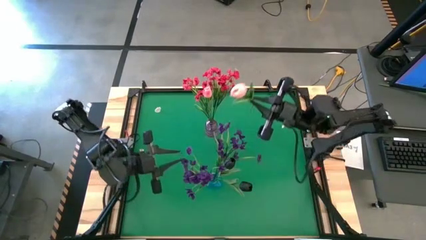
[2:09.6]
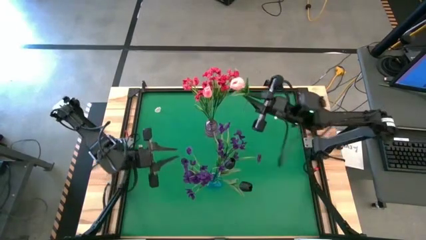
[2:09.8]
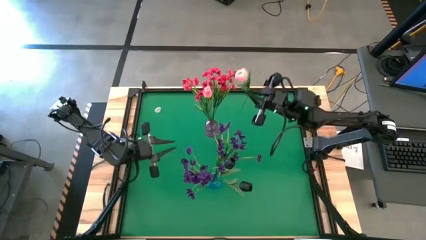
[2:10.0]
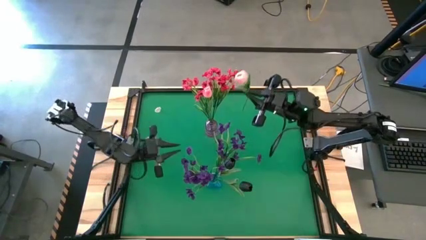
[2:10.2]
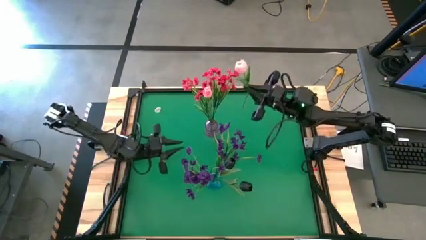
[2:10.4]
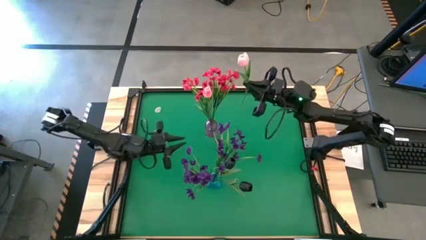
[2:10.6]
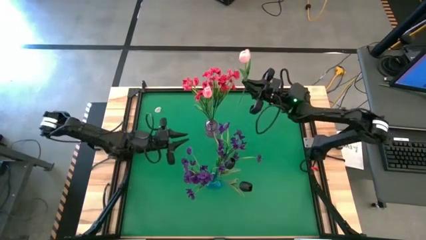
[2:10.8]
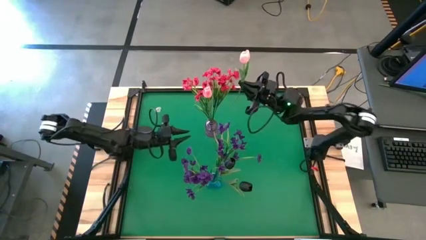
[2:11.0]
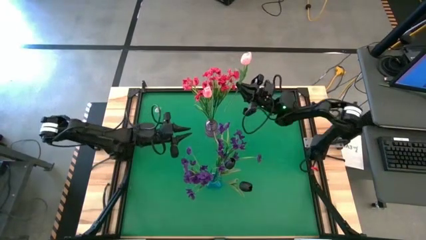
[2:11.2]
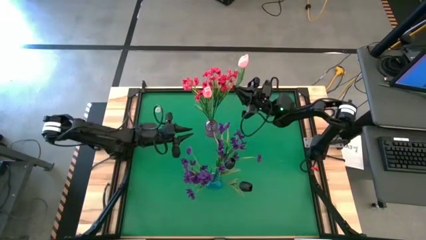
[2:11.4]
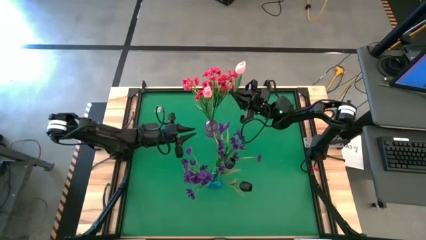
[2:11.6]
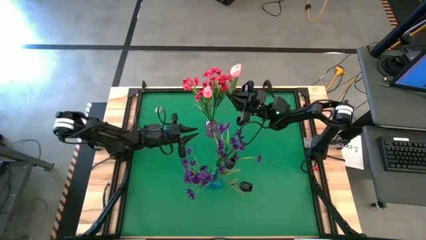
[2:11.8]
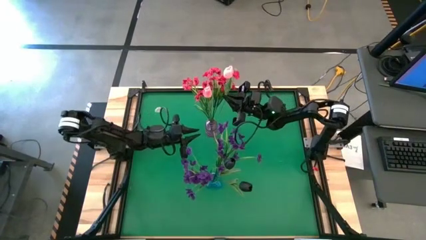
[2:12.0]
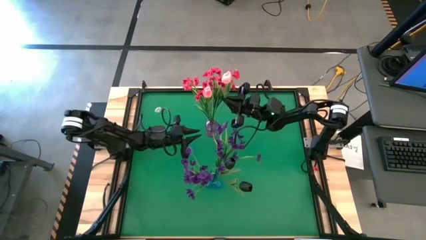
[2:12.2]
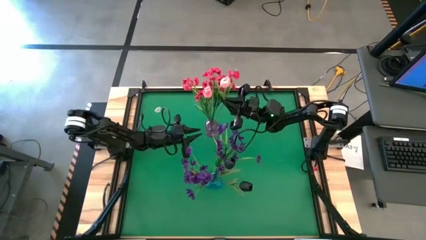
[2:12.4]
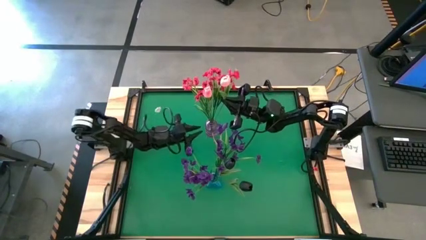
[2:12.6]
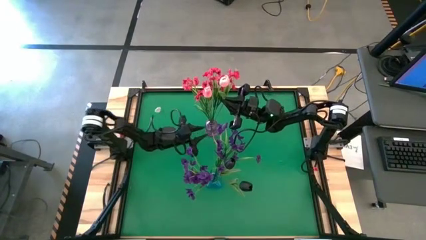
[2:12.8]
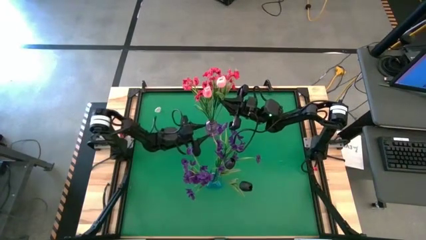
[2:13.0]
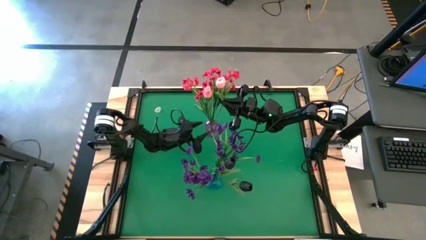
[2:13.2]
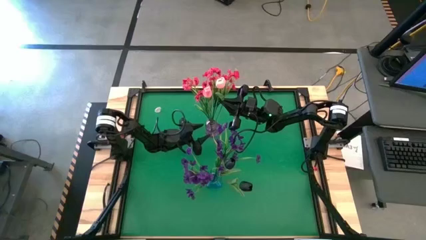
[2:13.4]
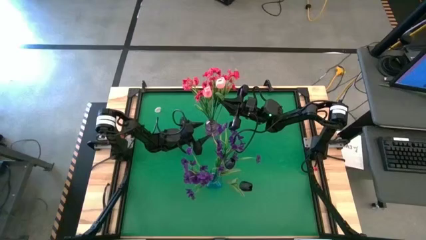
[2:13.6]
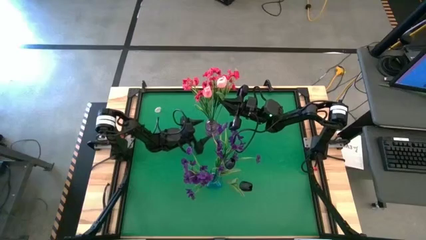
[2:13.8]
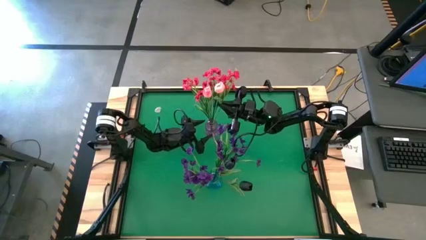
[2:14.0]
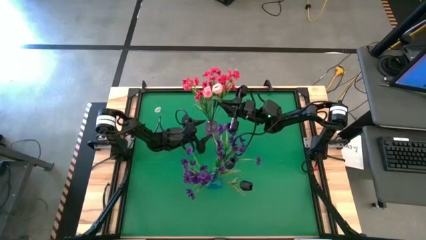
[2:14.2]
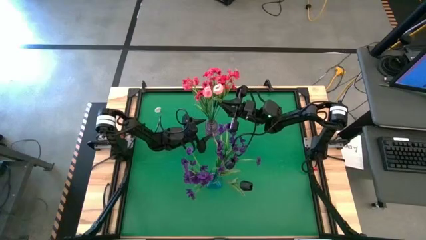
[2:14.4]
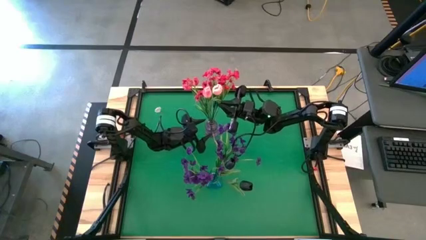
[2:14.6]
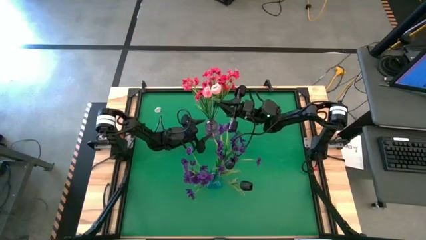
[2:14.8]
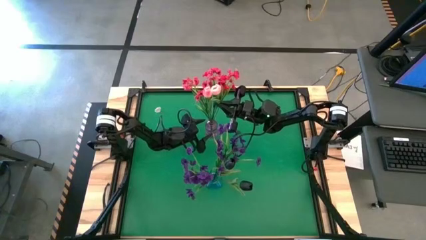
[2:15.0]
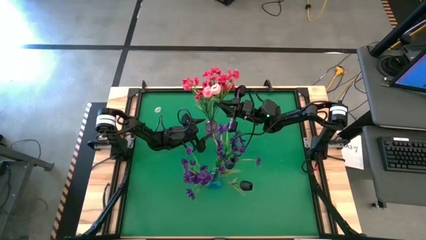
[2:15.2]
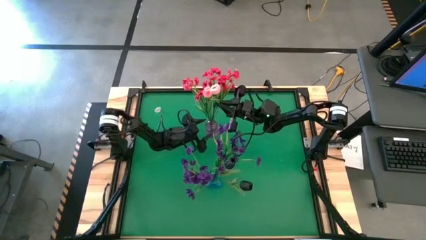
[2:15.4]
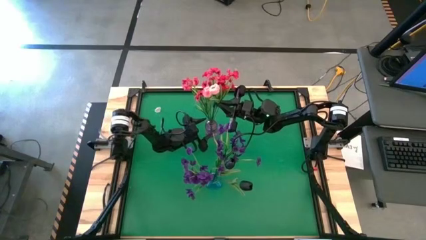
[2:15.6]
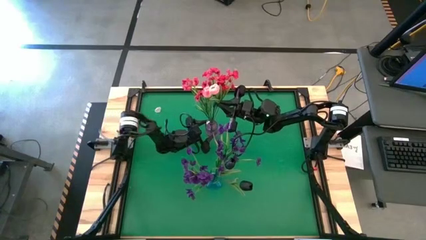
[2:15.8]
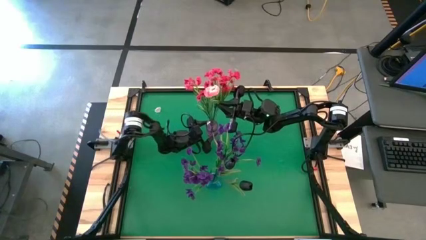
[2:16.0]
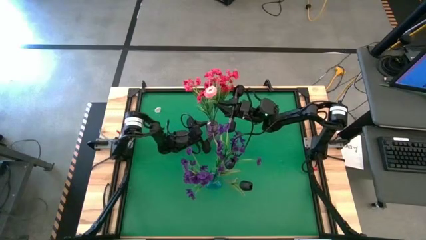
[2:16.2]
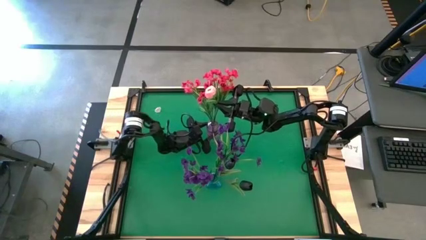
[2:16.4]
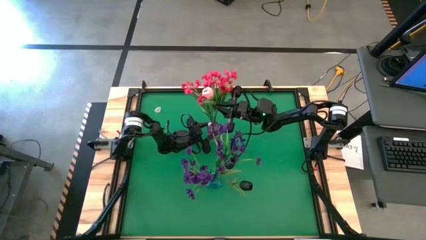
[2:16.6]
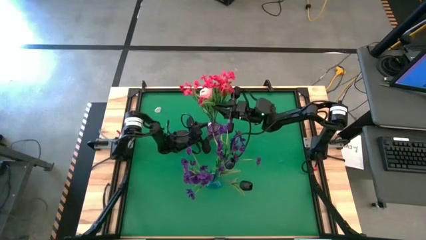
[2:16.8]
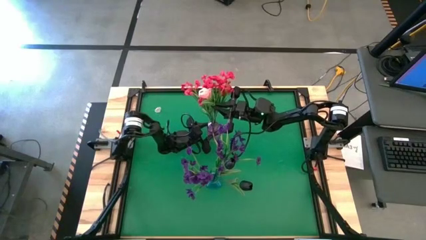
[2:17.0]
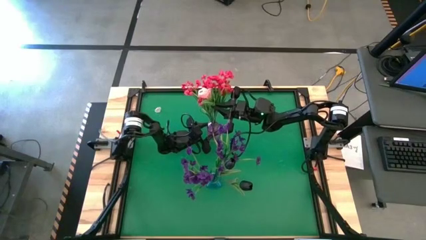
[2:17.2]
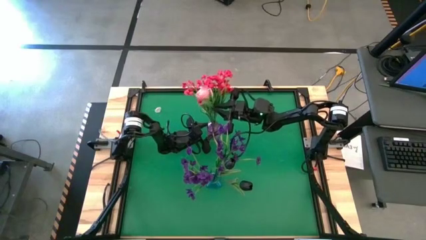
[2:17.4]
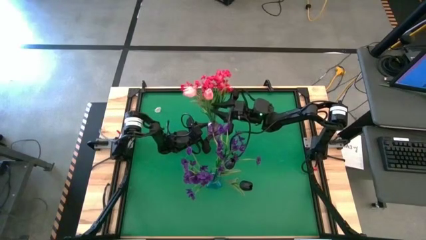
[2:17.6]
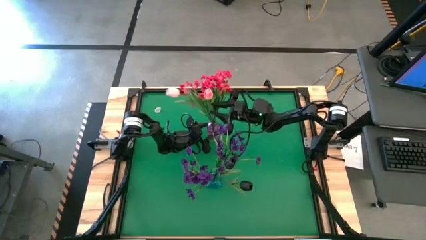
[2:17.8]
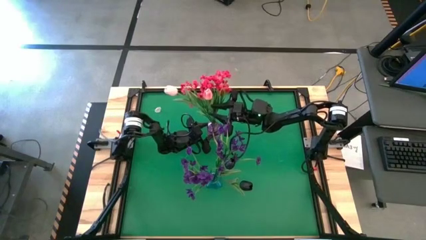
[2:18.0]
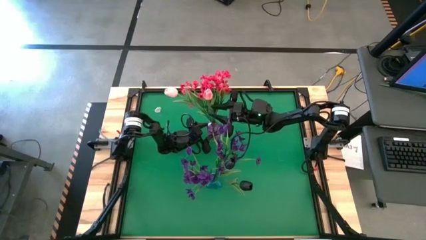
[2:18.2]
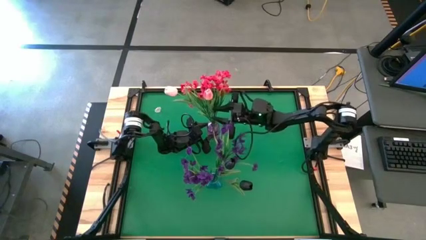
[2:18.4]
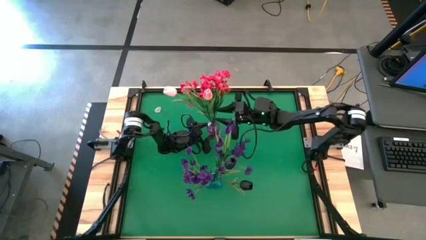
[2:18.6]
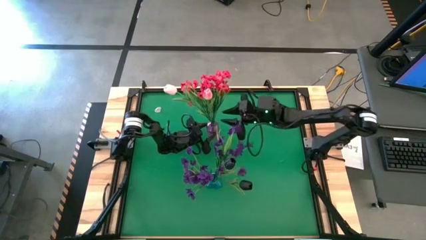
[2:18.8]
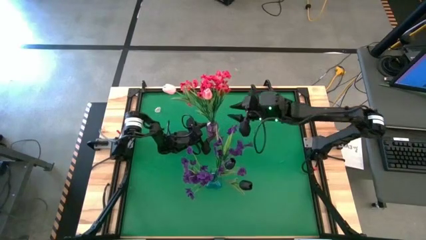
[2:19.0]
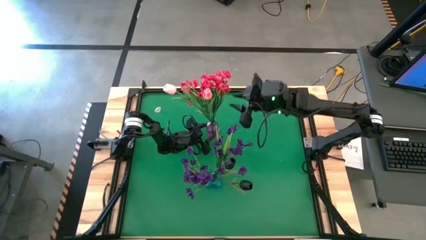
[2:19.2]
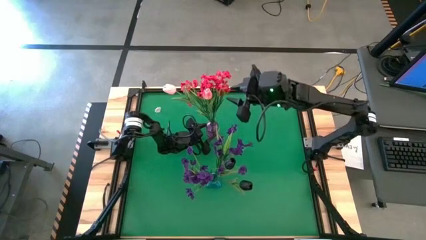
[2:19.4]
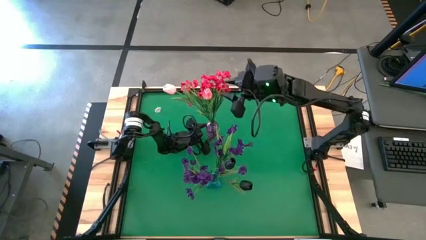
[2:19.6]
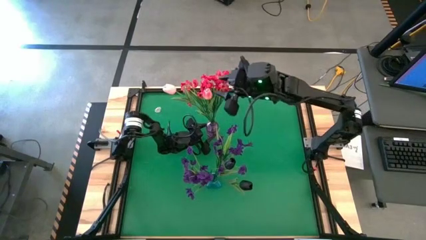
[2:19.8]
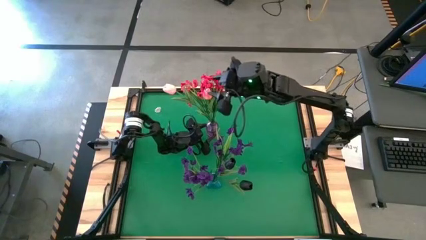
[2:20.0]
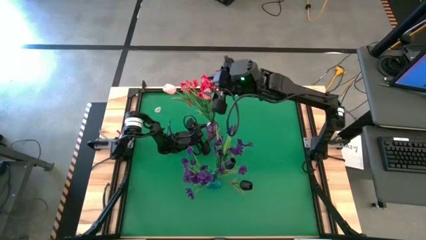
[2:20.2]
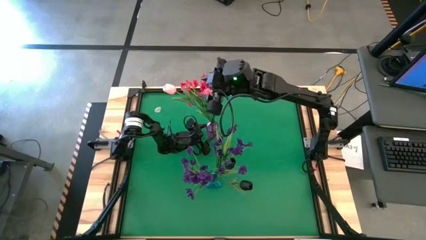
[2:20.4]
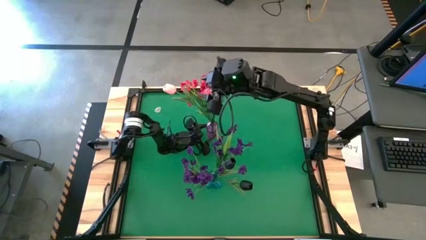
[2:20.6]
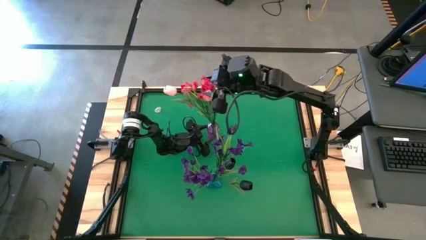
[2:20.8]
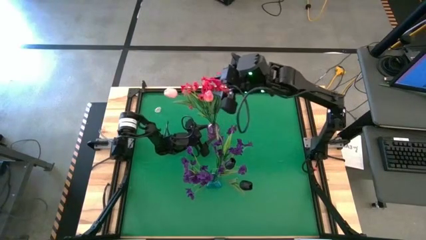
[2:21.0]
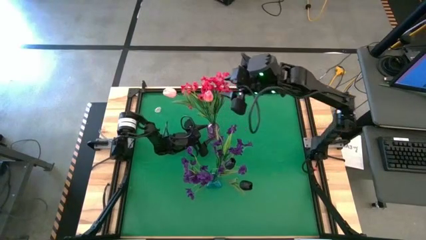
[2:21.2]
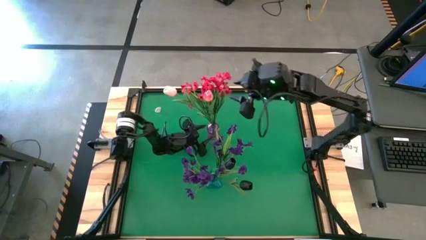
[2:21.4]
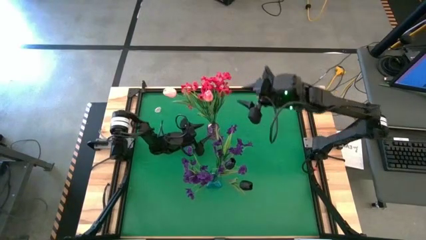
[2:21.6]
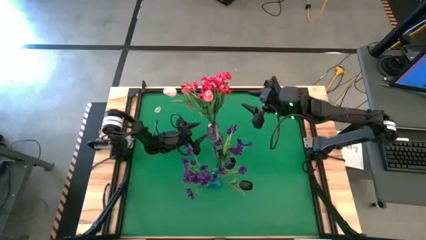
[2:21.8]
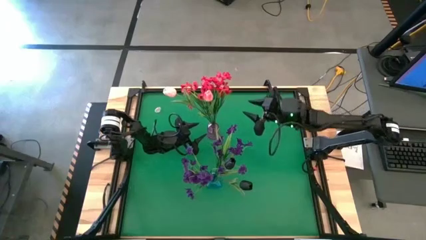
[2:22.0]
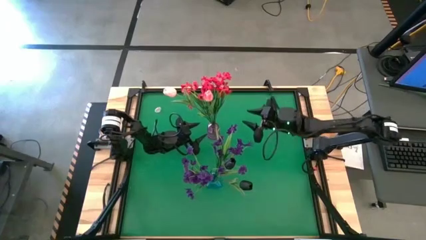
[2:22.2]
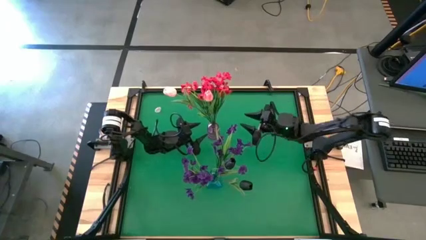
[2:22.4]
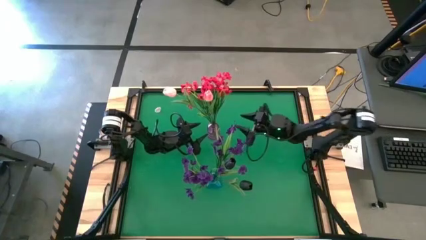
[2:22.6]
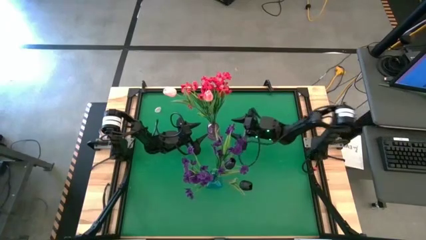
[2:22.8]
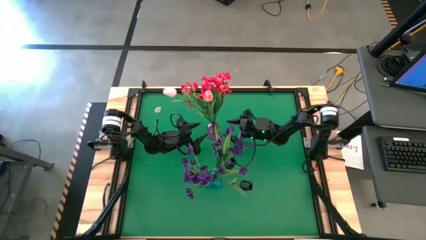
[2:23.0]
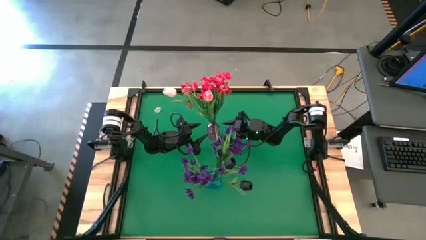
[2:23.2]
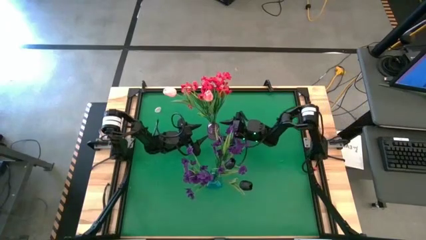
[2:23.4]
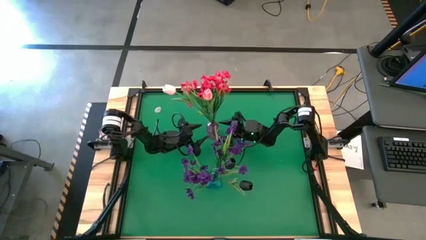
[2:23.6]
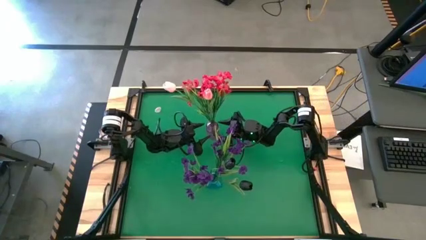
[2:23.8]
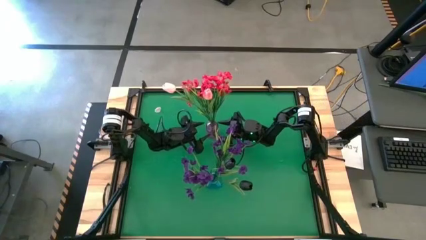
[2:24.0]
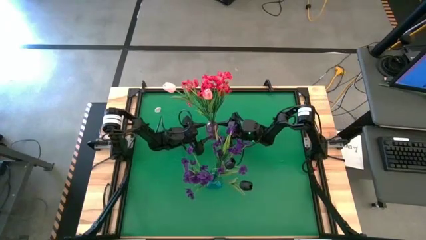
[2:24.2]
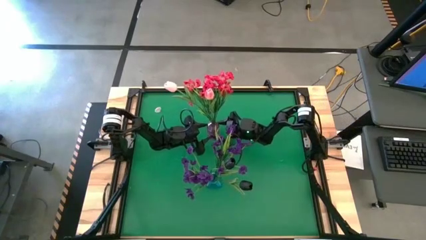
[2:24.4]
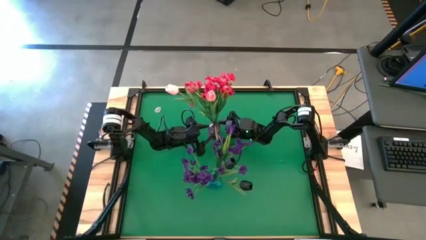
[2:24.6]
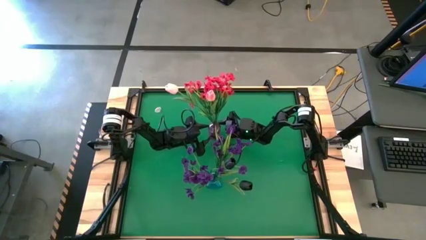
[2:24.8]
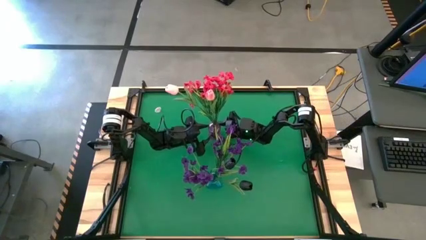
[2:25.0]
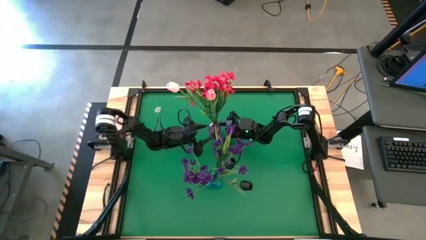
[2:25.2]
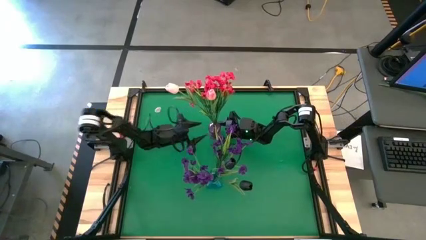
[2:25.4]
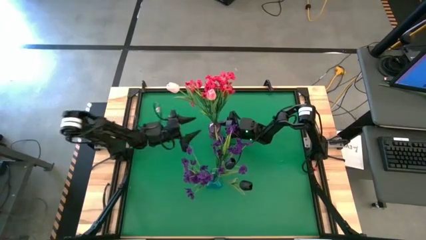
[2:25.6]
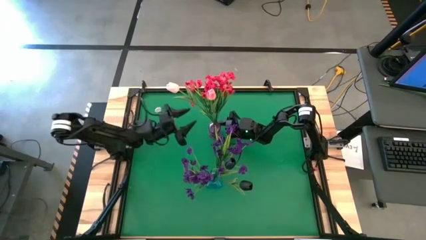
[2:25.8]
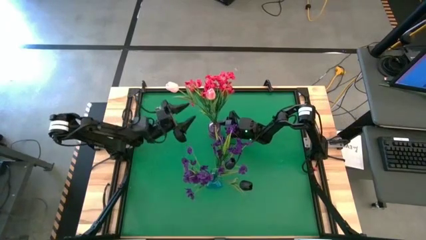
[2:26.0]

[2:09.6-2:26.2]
Task: Sort flowers into vase by color
Put the pink tulip into the purple vase
